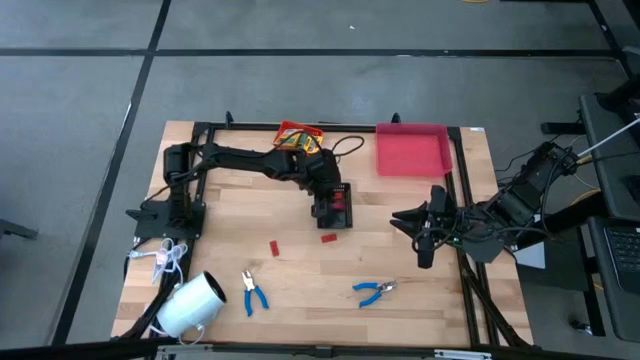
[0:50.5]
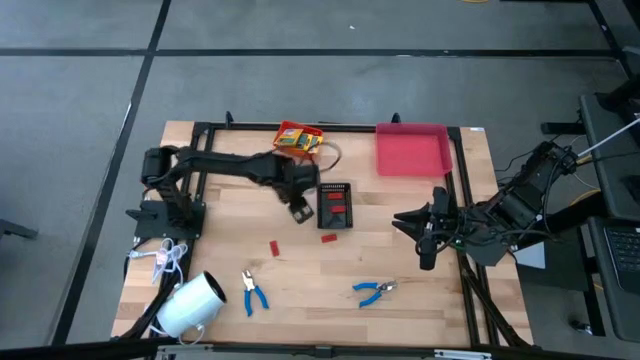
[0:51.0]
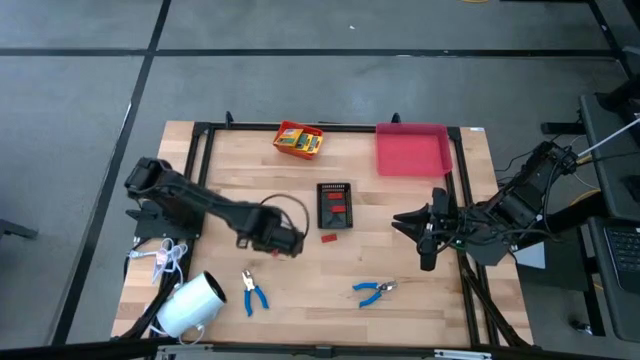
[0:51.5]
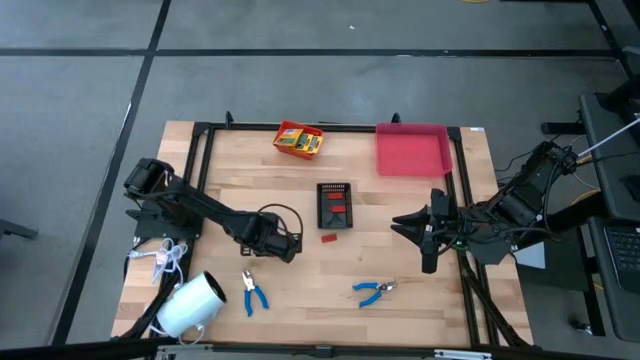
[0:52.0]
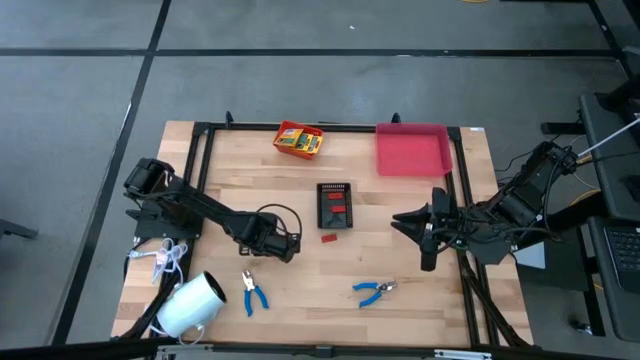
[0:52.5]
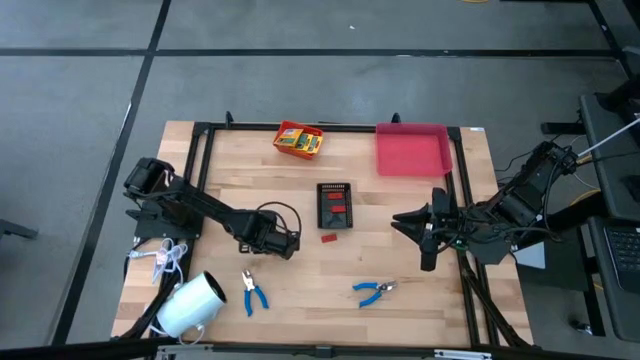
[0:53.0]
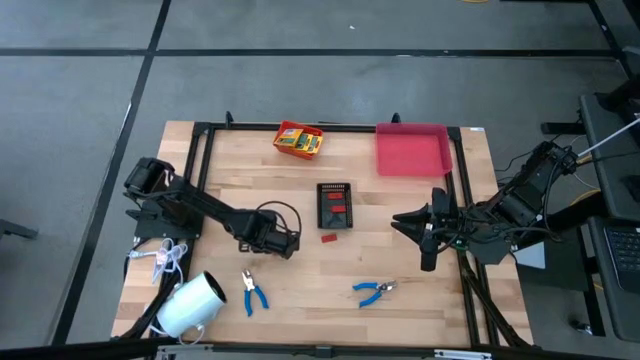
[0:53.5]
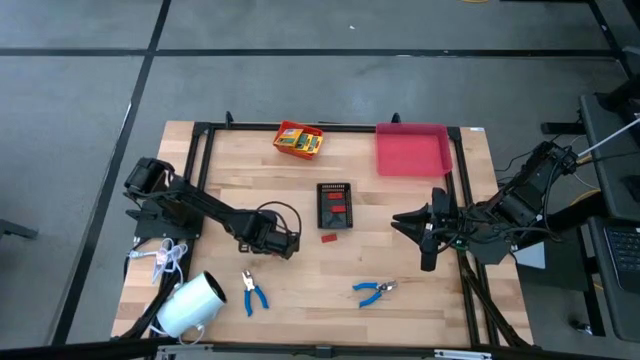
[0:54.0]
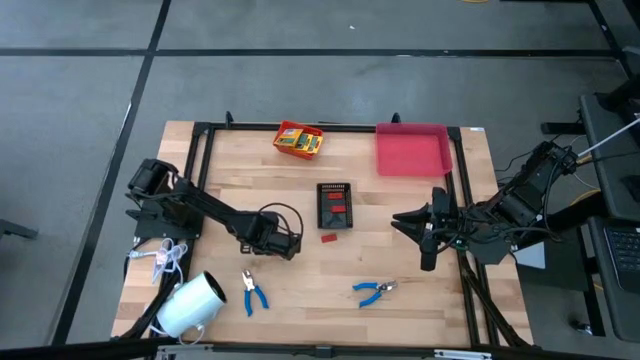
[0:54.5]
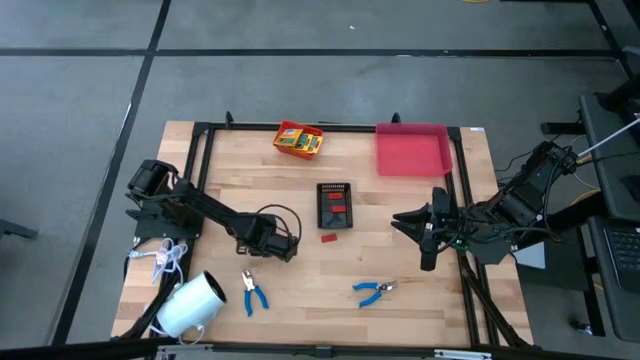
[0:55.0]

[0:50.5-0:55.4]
Task: Pick & Place School Supplies
Put the red eraser into the black bin

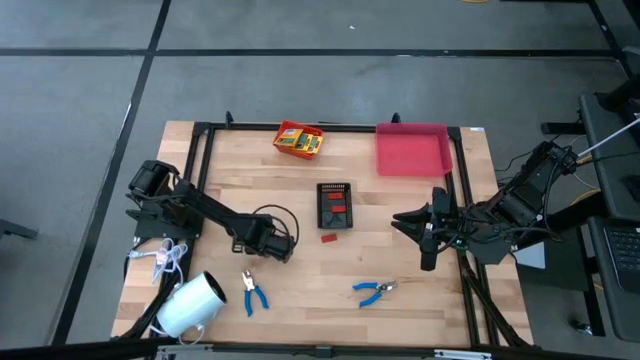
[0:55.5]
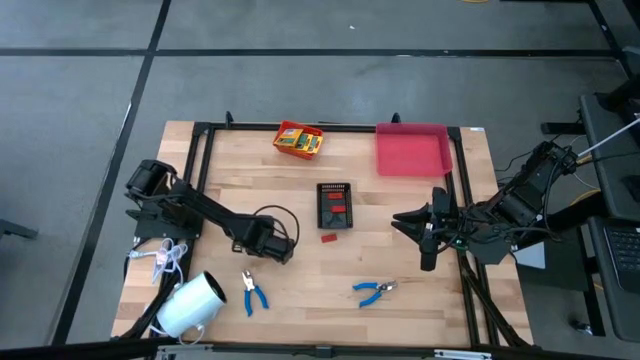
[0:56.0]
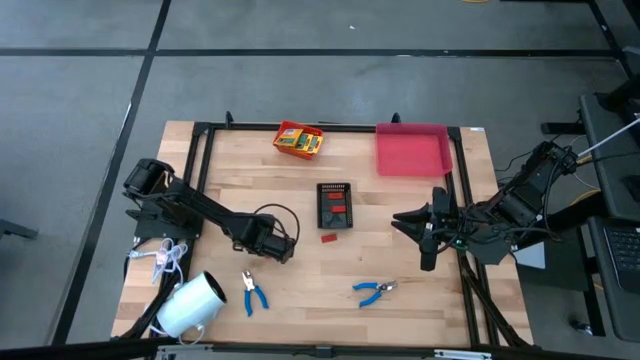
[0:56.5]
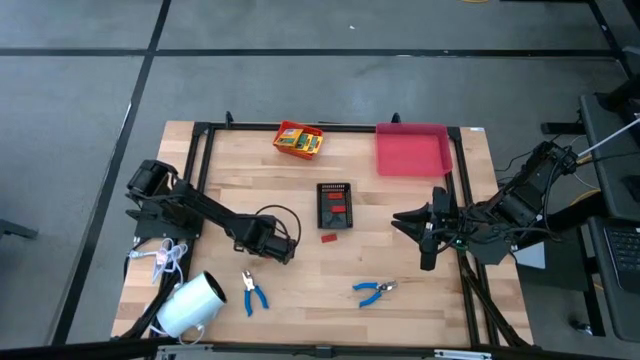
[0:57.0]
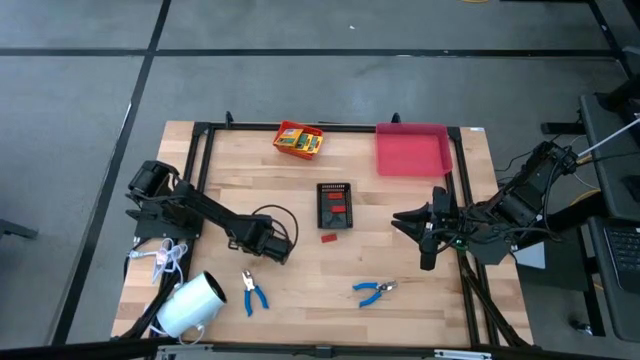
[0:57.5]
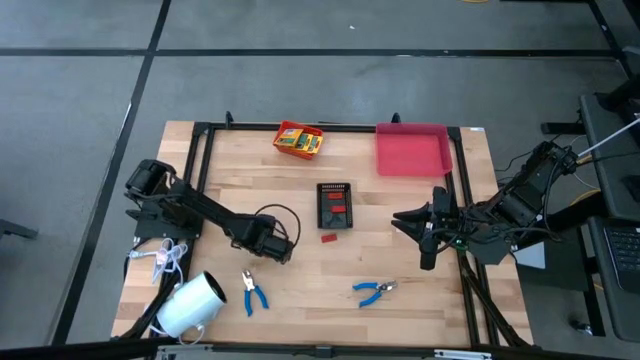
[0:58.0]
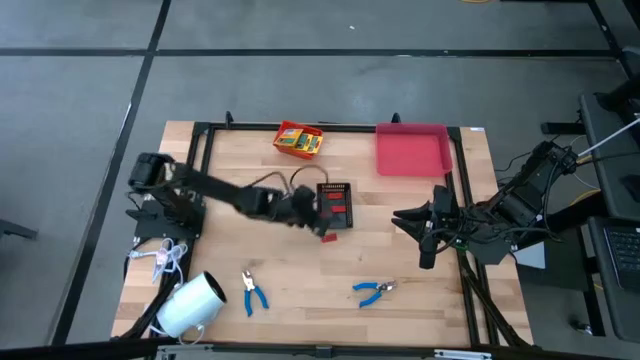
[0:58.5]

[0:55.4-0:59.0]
Put the red eraser into the black bin

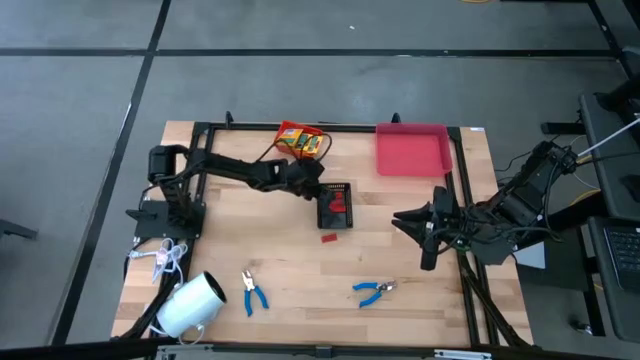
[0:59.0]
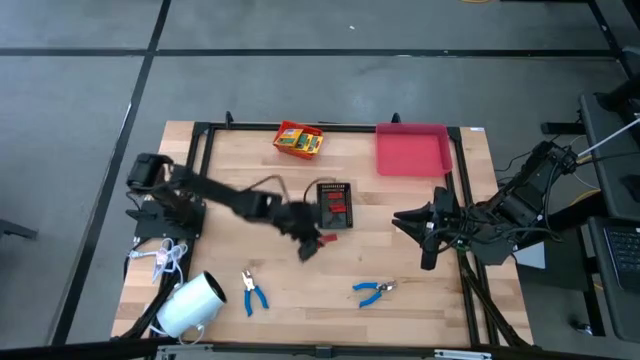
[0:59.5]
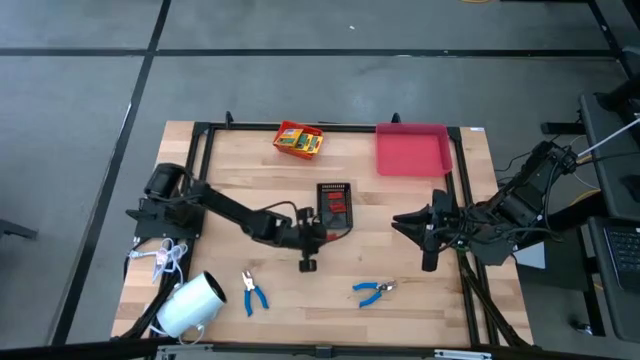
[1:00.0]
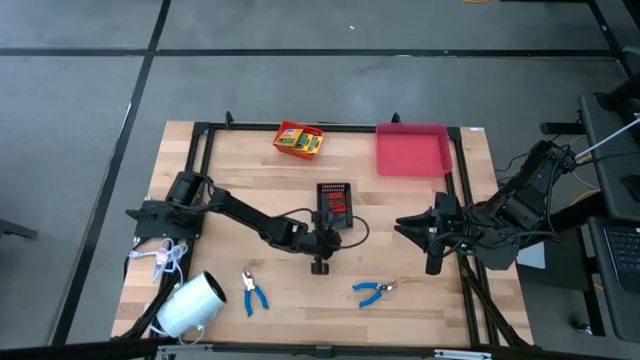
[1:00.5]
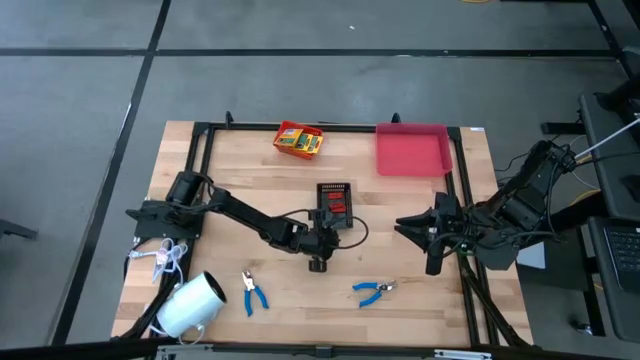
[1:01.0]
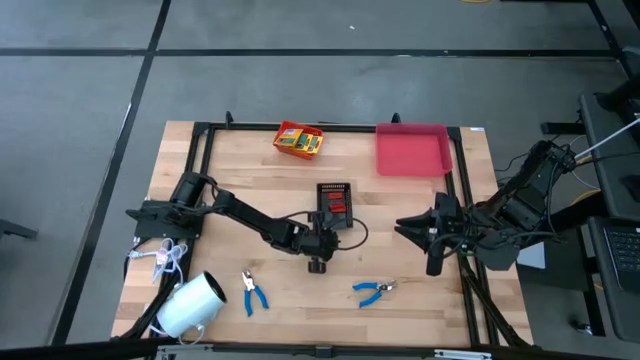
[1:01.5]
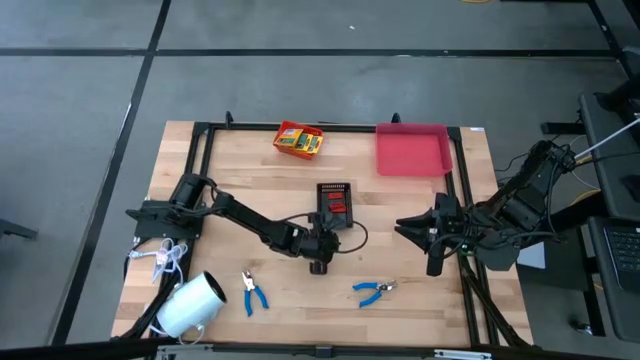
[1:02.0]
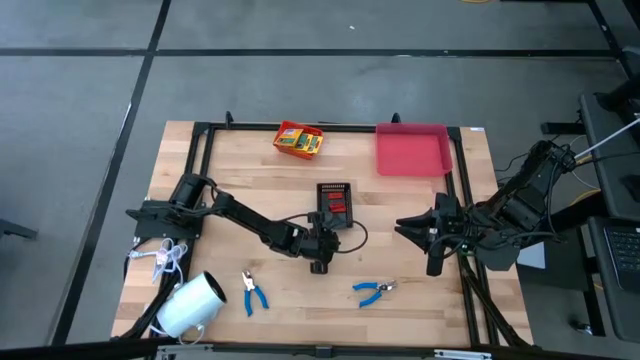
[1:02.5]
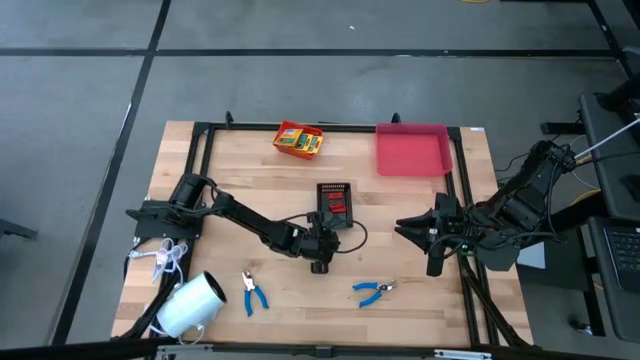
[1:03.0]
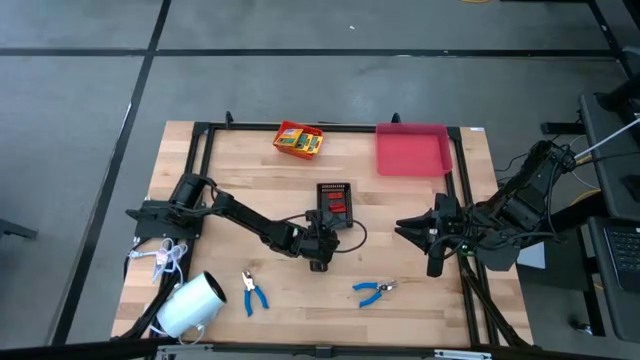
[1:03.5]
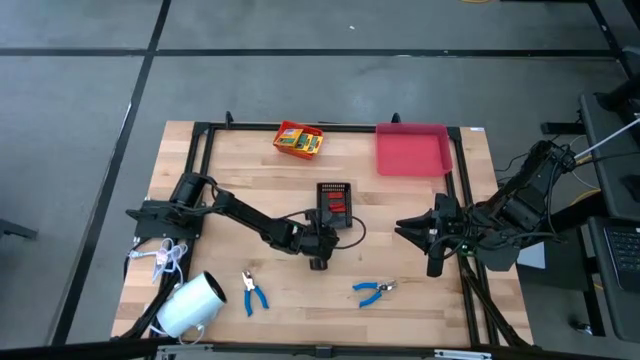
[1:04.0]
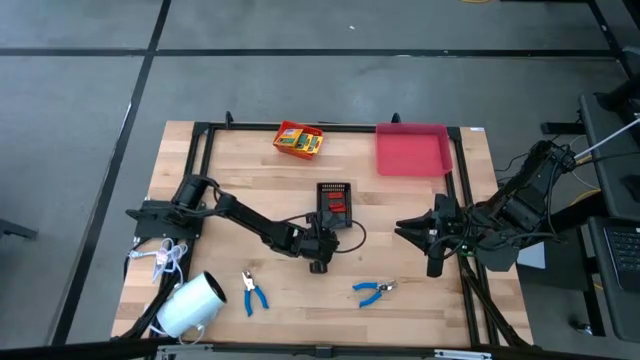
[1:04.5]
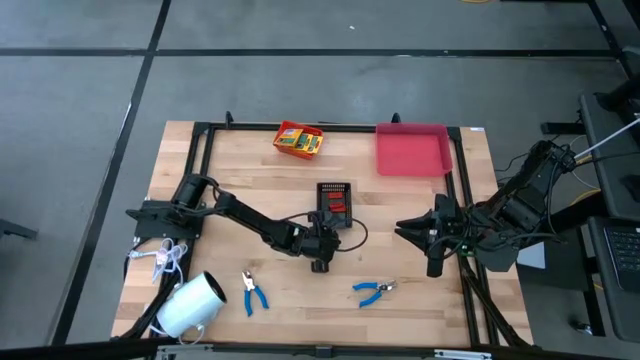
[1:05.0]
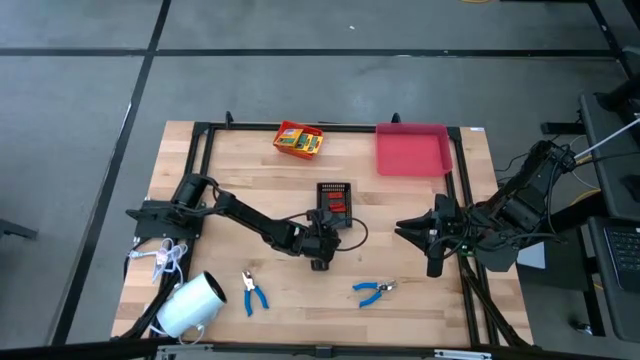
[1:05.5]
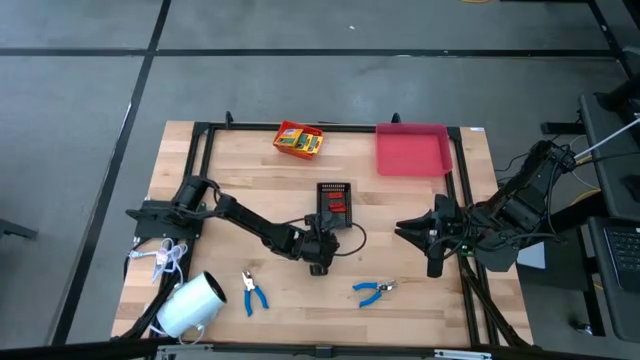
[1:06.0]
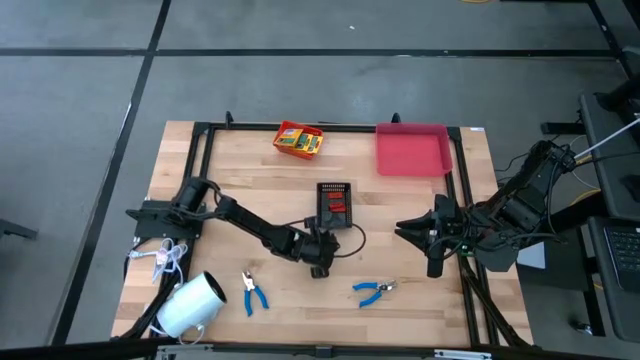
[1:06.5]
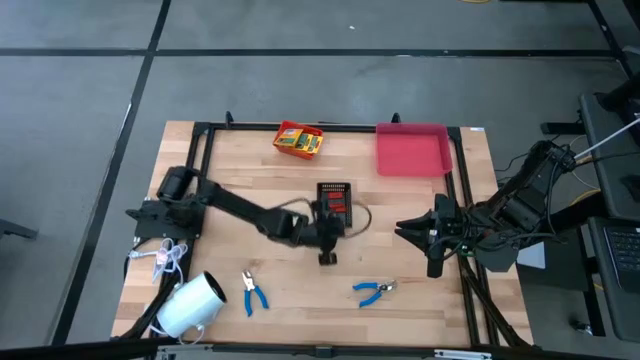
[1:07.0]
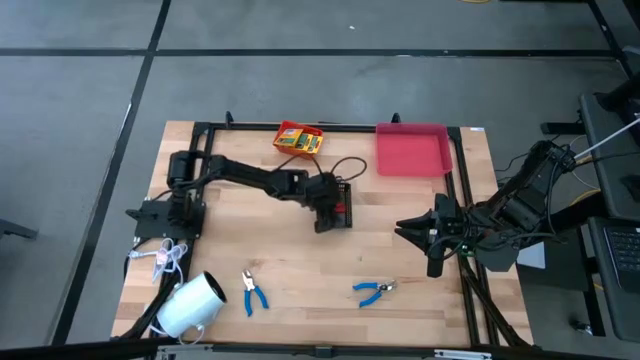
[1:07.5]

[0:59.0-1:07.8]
Put the red eraser into the black bin

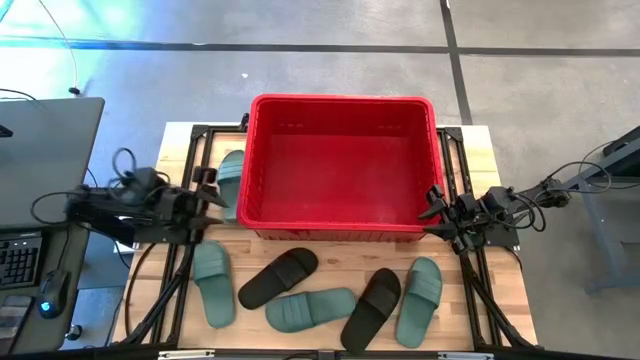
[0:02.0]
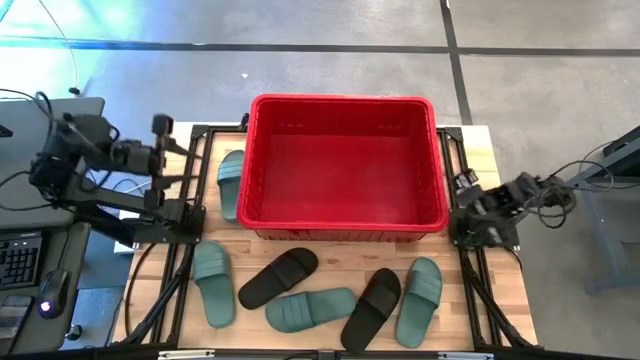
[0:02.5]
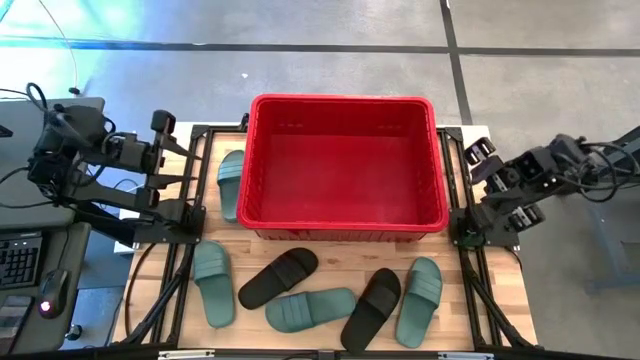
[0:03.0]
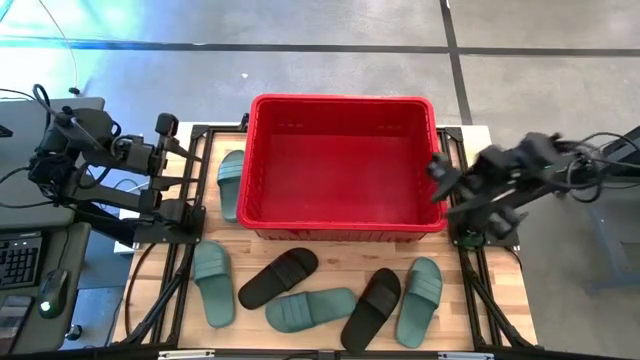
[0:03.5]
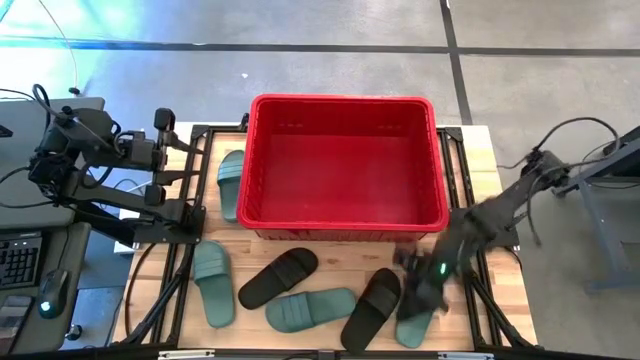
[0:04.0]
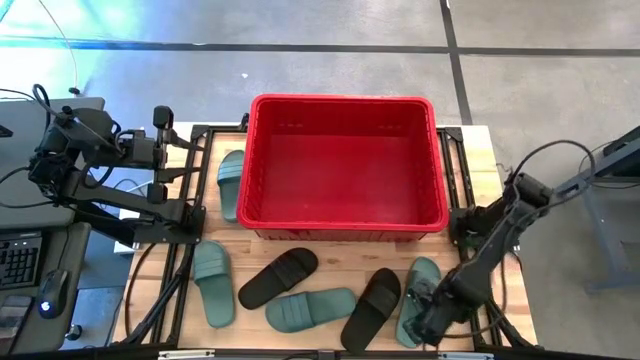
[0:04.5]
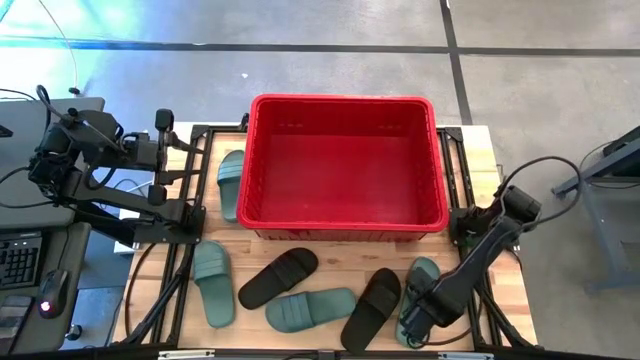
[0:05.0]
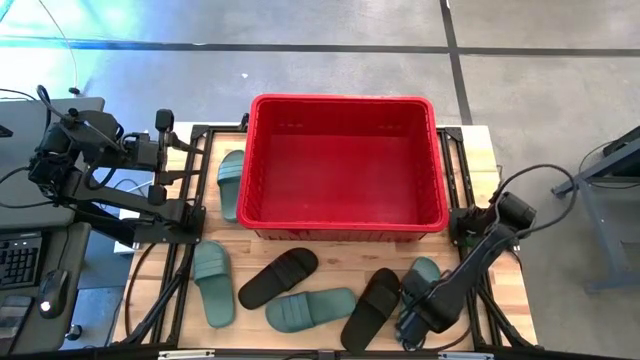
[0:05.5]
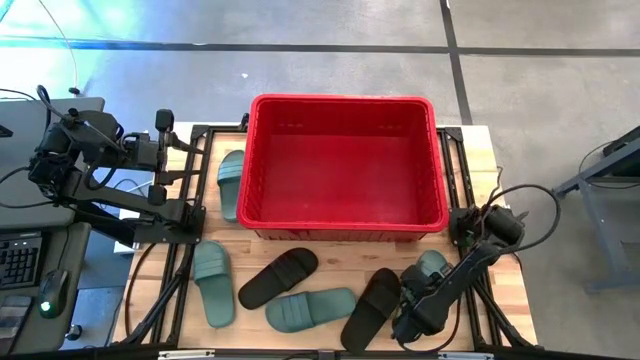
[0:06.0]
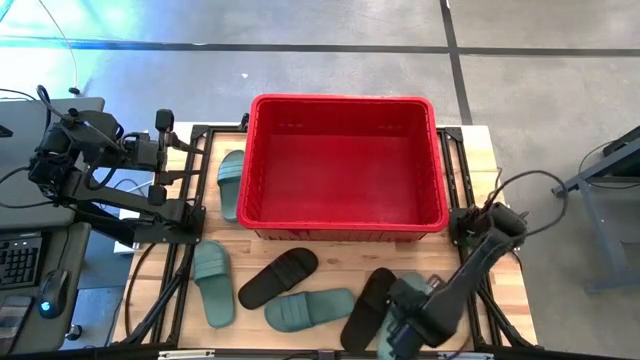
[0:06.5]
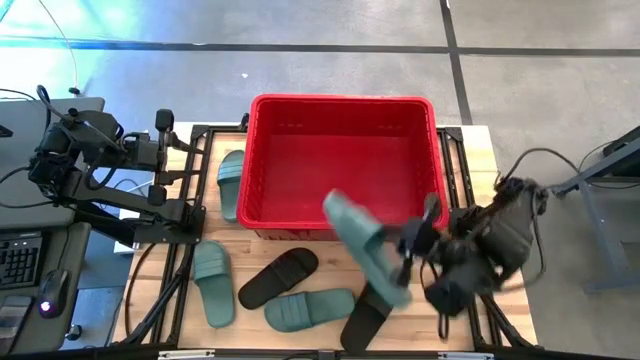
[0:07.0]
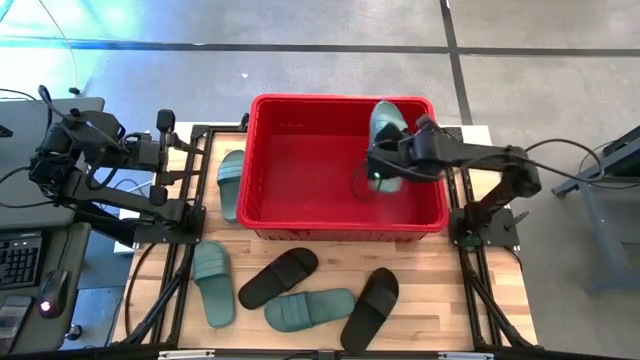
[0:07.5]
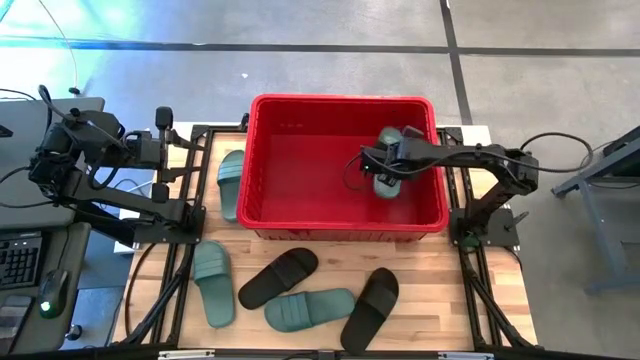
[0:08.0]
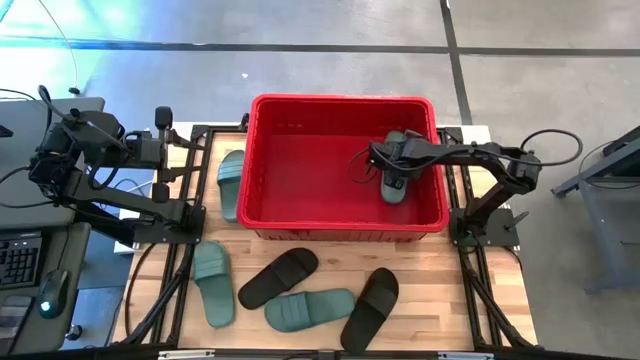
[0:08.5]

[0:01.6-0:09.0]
Task: Pick and place slides into bin
Put the green slide in the red bin
